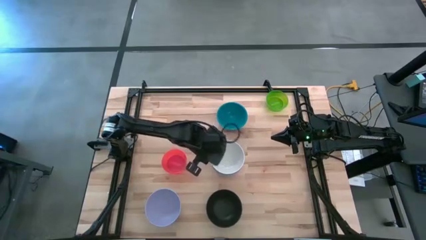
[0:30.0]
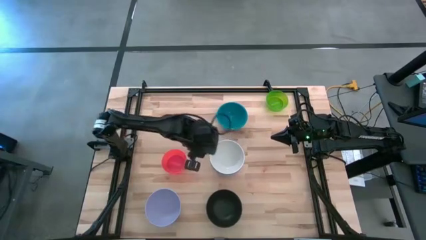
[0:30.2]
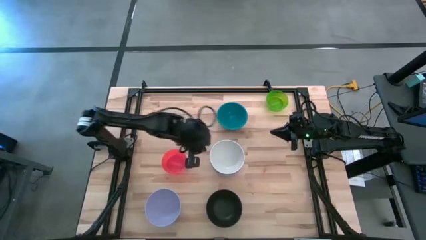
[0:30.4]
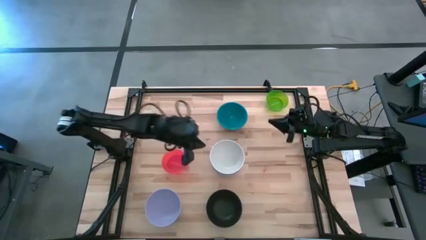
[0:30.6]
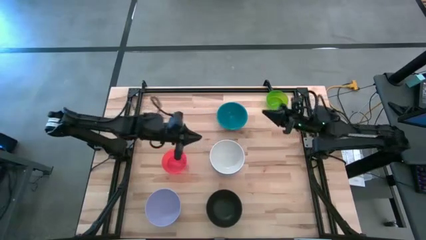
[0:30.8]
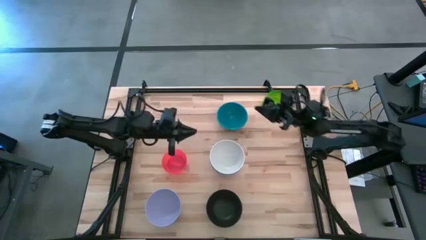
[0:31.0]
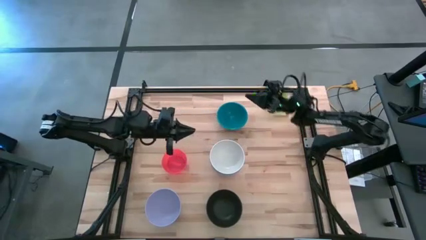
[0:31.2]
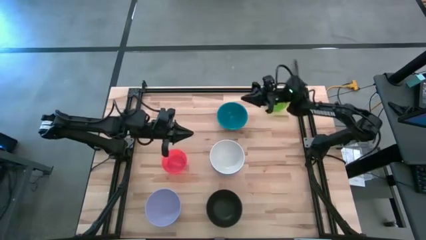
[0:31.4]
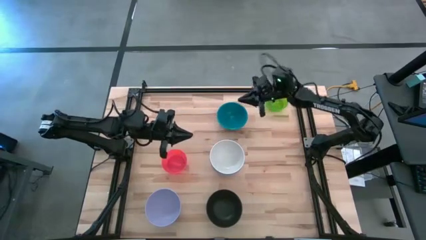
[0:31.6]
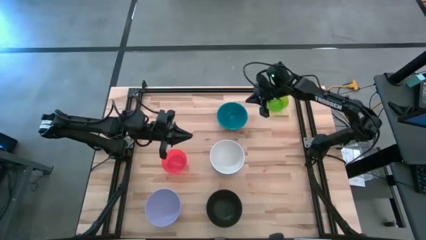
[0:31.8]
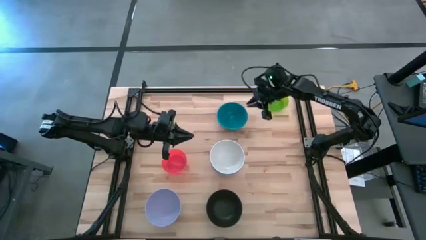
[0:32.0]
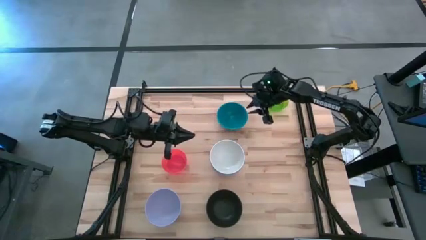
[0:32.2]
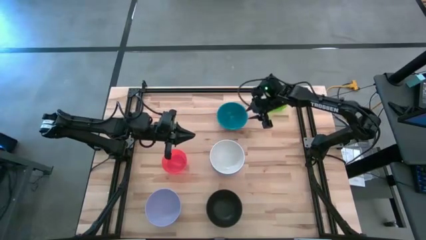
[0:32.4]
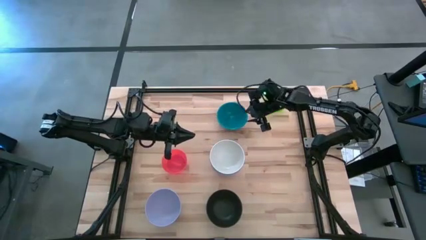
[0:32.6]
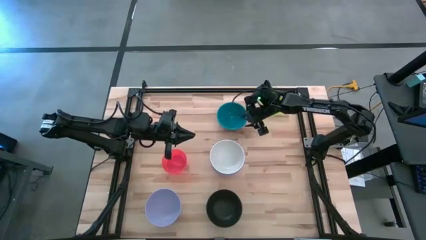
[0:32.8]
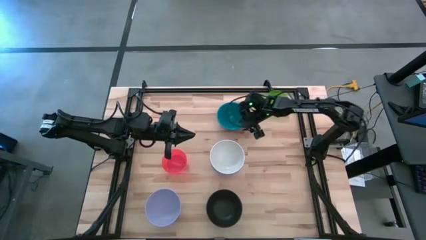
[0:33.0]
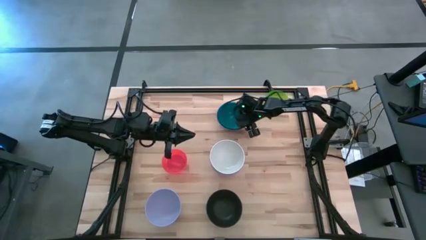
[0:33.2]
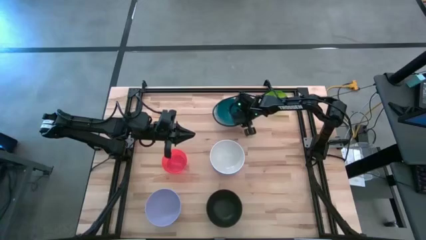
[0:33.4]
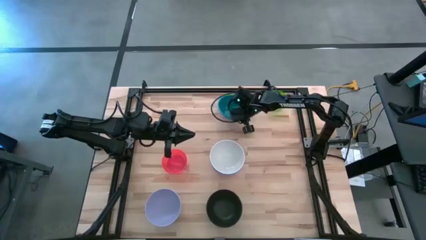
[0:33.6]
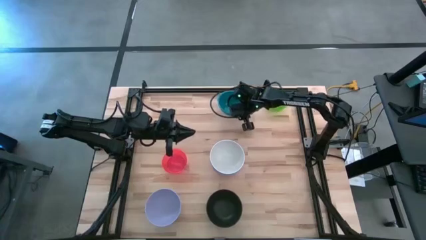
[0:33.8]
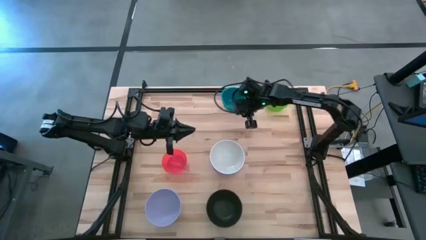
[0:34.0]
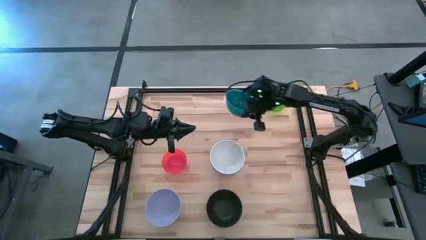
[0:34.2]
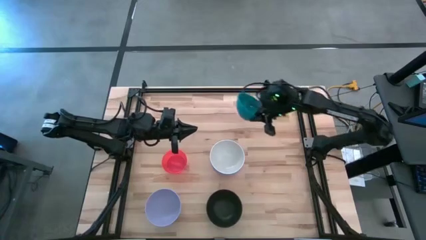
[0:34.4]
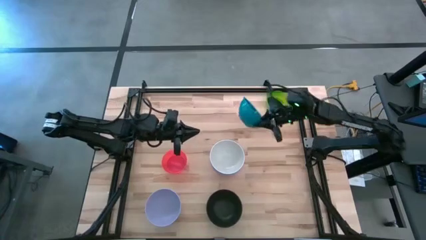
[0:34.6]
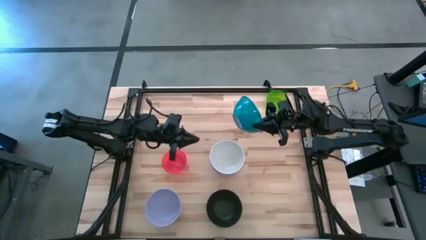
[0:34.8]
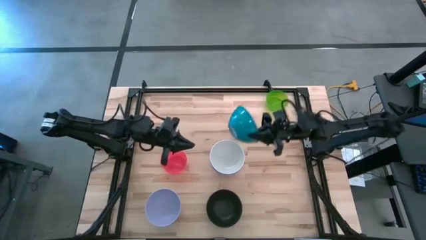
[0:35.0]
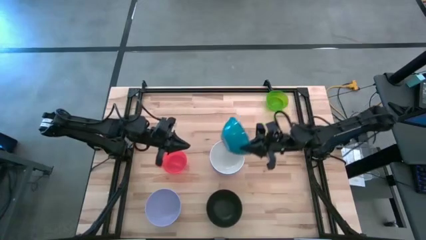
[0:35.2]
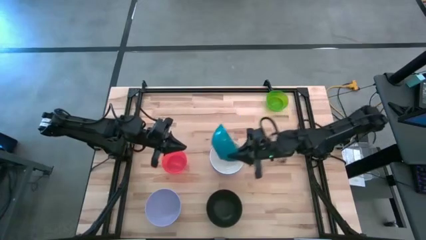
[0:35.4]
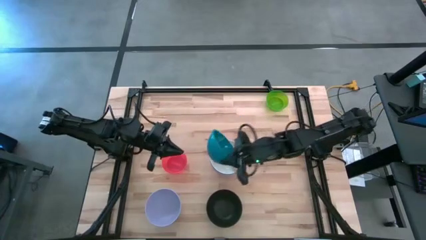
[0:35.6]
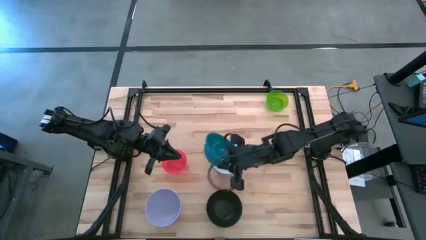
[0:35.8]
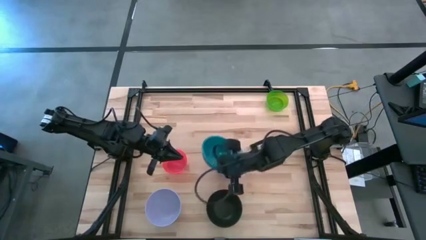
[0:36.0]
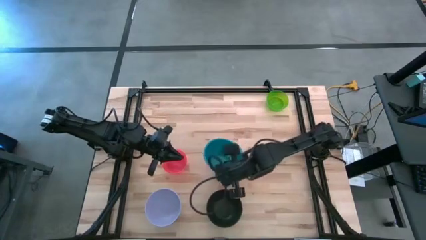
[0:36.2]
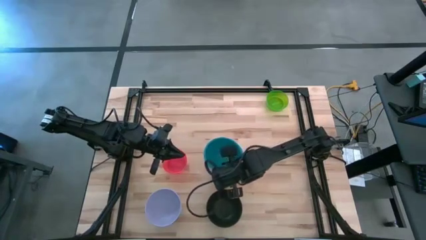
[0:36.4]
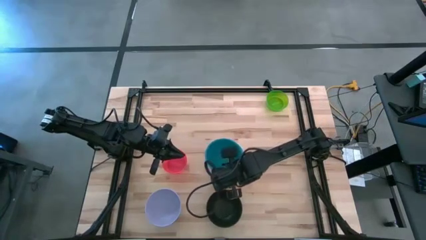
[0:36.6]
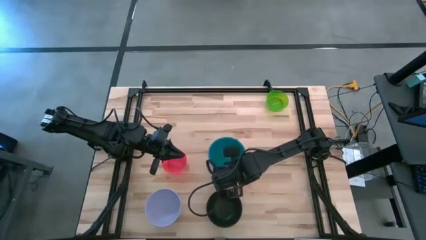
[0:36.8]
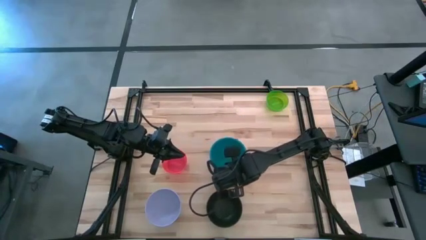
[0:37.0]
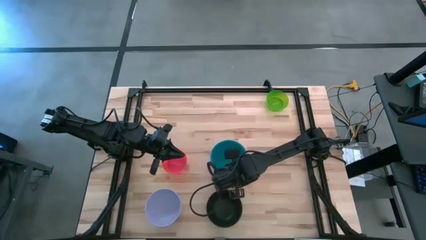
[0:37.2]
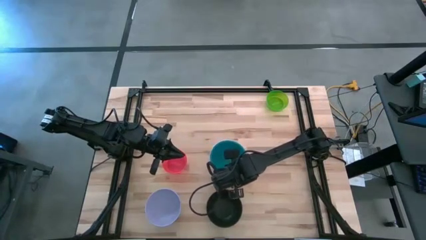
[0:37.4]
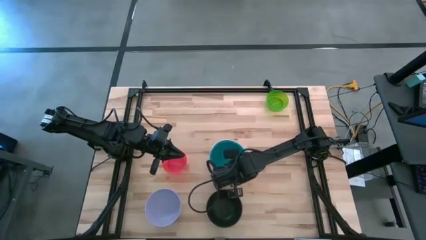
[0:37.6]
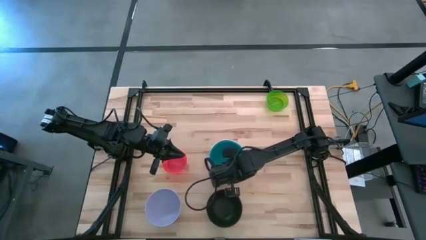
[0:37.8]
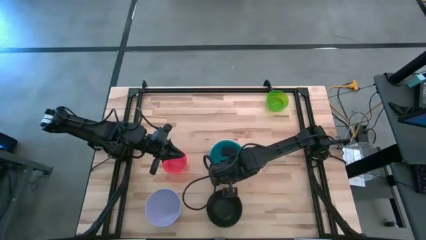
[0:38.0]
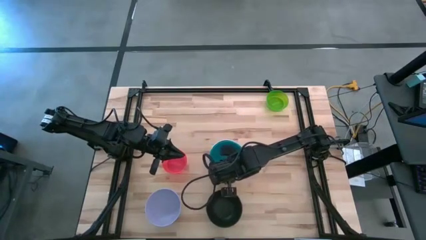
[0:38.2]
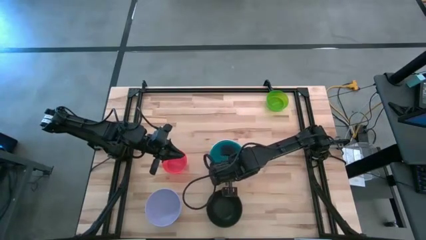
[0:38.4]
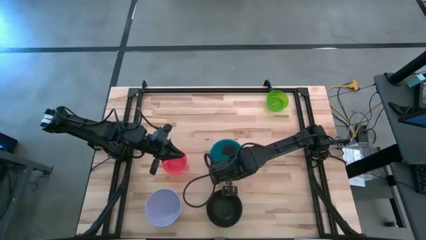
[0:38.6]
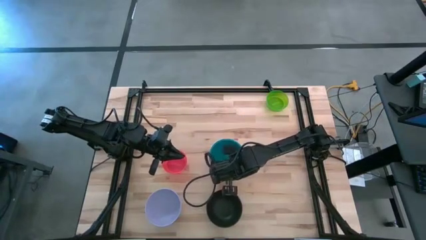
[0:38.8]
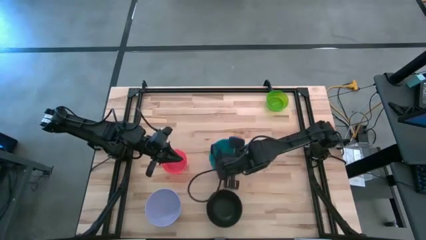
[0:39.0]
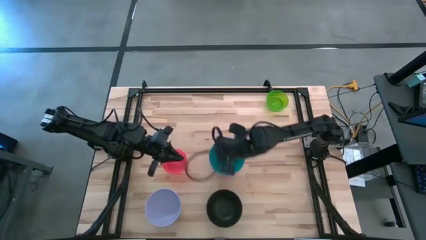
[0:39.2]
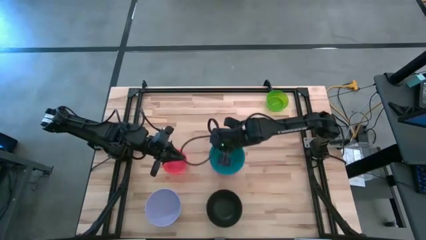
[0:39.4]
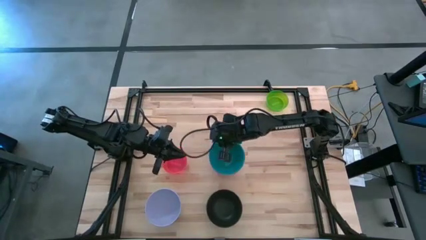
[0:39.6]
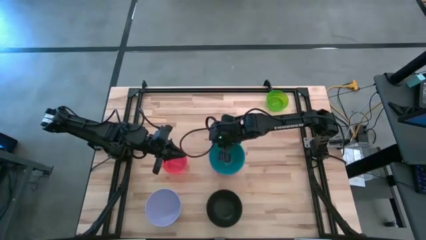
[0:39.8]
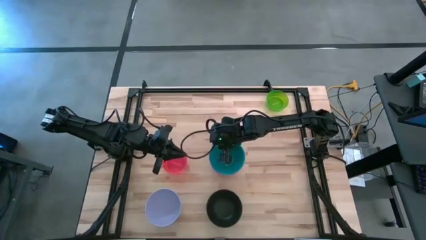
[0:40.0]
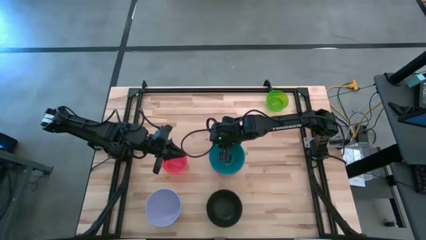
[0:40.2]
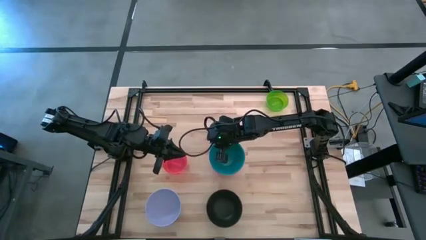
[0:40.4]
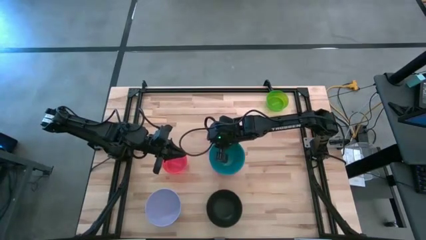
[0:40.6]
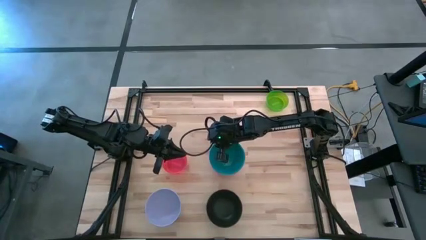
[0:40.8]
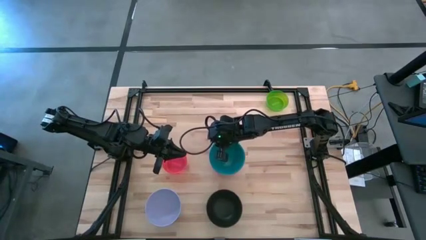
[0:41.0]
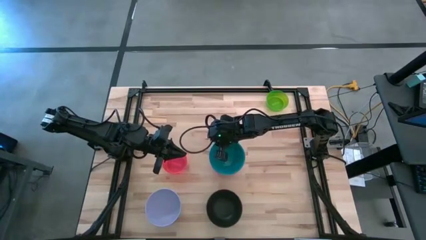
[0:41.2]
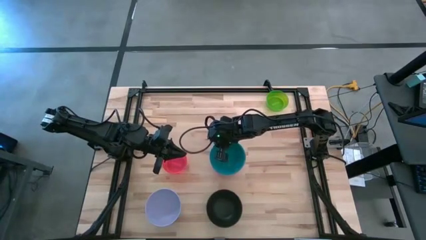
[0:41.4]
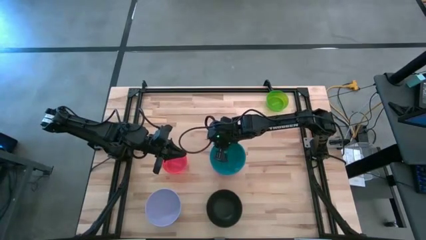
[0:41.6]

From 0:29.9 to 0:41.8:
Task: Nest bowls inside each other
Stack the green bowl on top of the white bowl

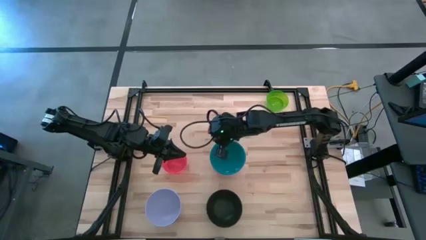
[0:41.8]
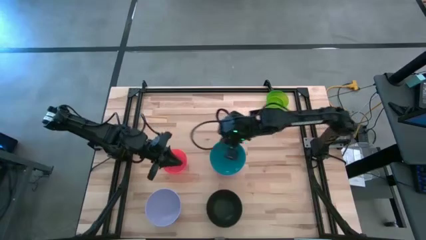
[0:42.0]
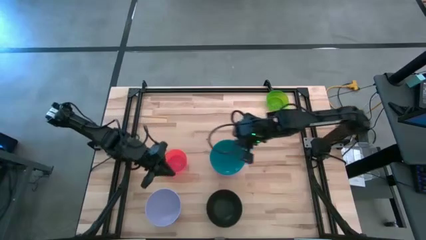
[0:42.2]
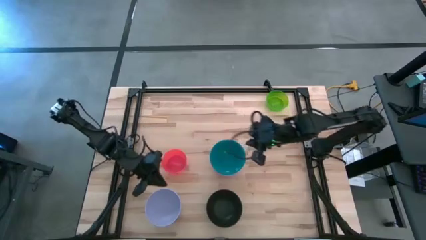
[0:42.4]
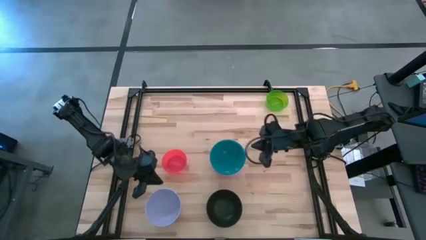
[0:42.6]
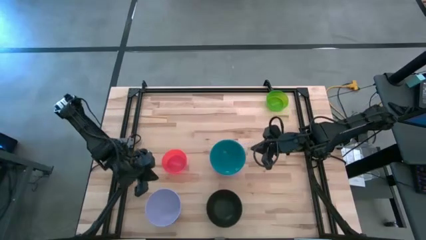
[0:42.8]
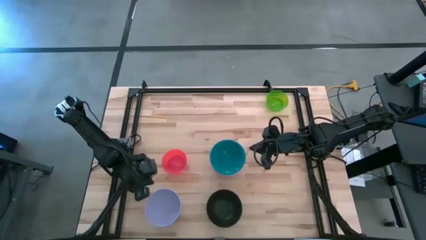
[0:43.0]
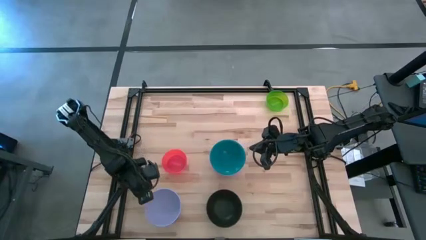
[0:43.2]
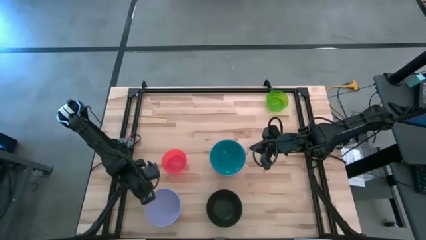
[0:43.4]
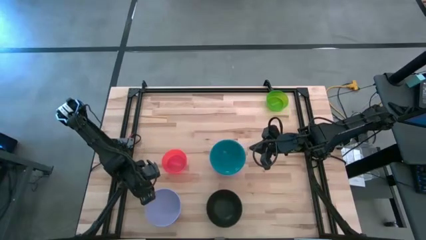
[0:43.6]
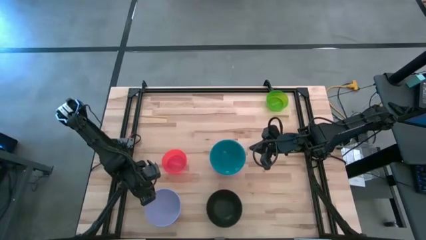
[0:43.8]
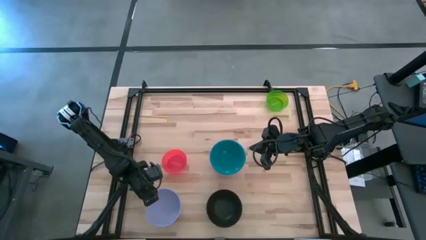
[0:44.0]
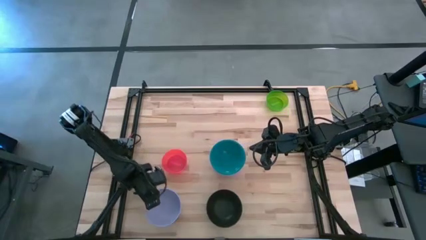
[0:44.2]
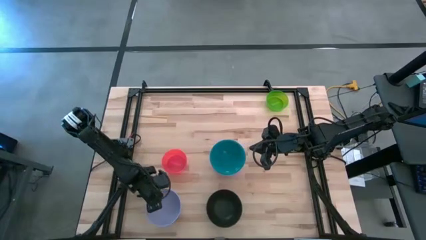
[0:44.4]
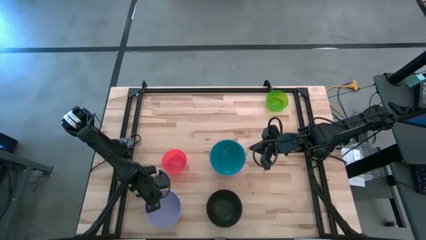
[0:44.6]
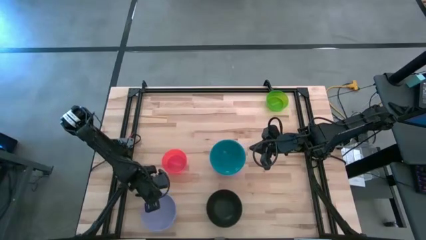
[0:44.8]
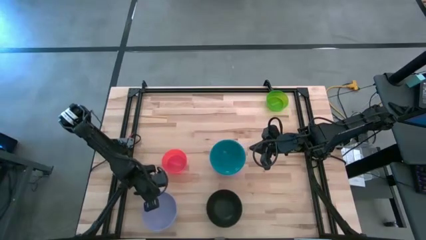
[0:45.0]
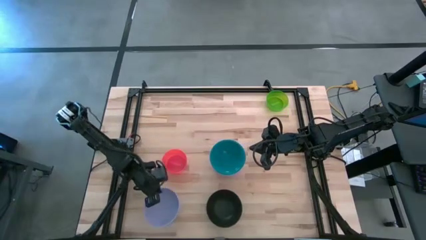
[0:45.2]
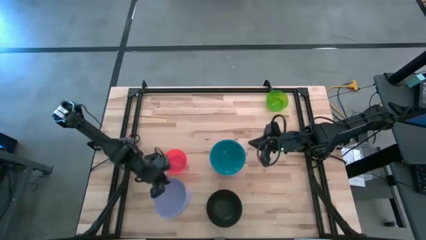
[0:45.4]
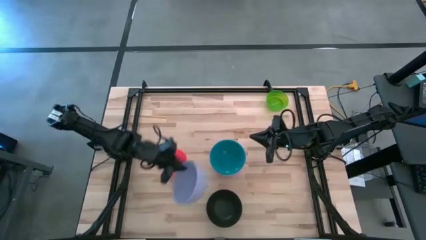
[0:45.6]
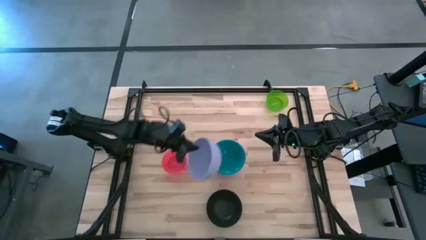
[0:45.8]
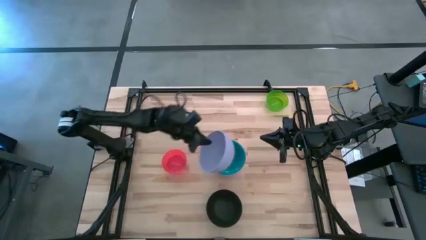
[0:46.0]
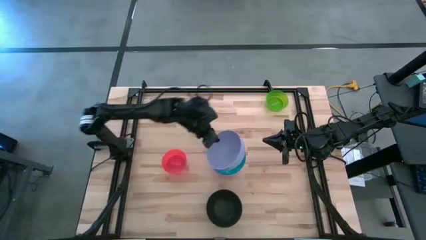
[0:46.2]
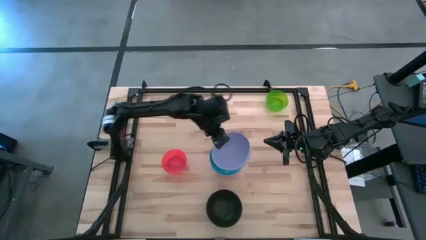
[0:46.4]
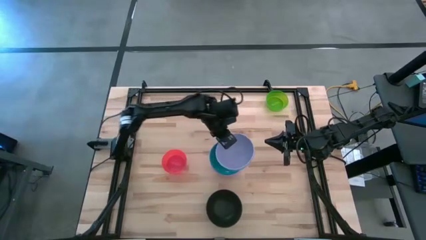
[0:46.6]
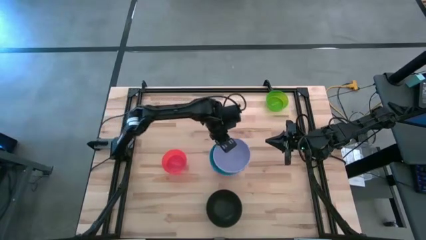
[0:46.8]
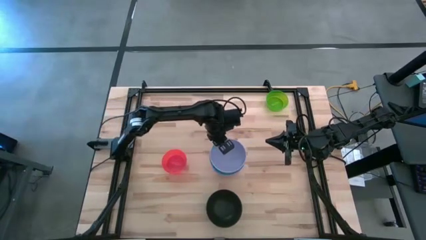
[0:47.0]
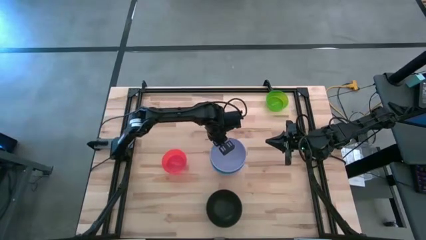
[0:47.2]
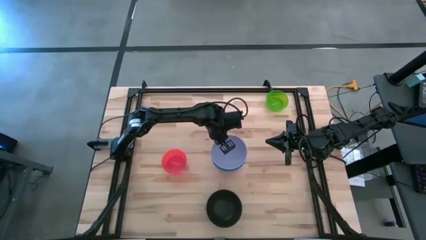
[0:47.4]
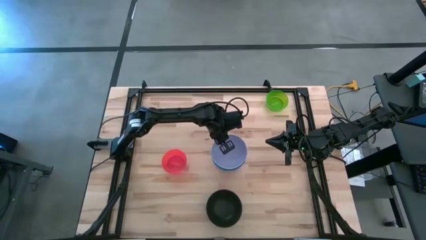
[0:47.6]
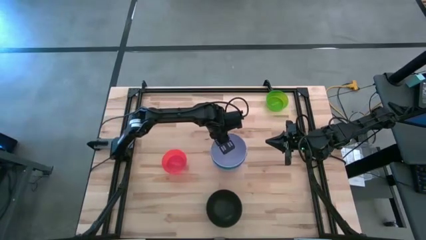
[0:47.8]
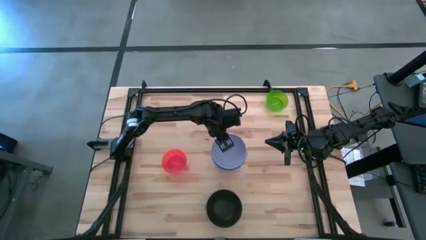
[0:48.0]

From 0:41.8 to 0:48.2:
Stack the violet bowl on top of the green bowl
